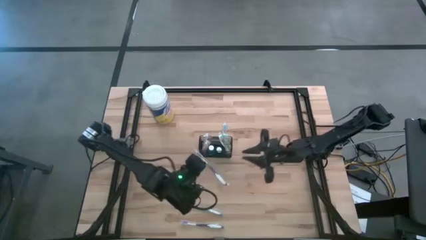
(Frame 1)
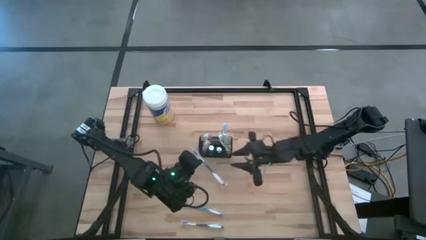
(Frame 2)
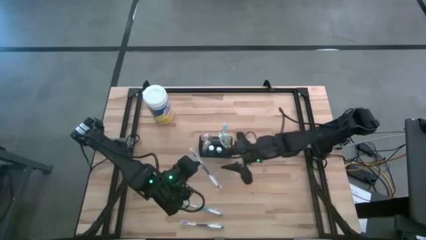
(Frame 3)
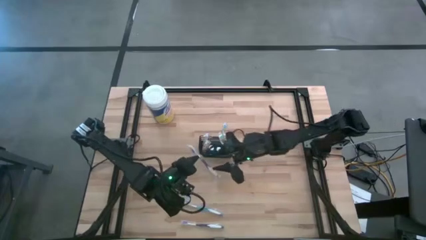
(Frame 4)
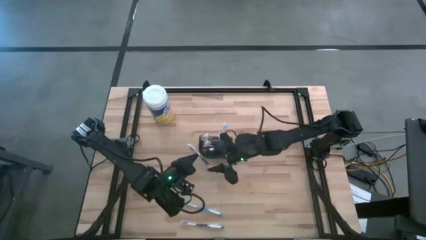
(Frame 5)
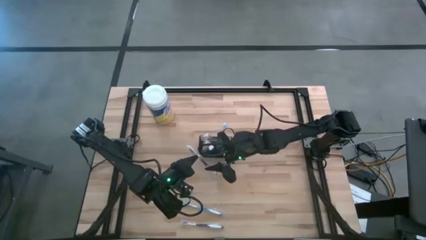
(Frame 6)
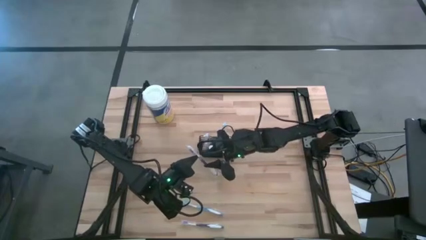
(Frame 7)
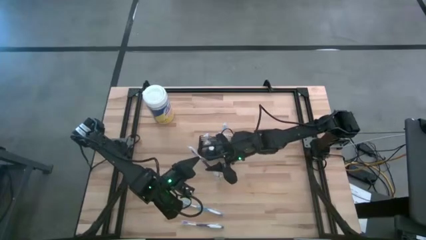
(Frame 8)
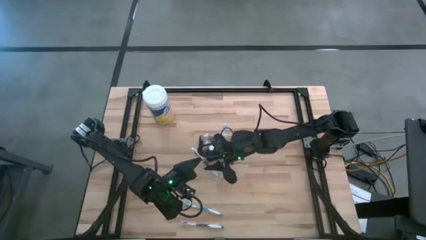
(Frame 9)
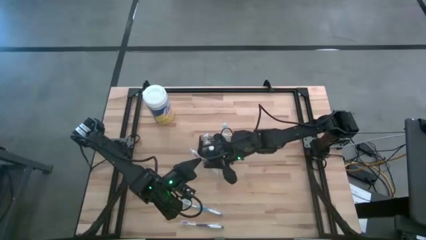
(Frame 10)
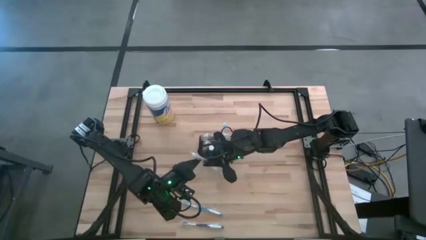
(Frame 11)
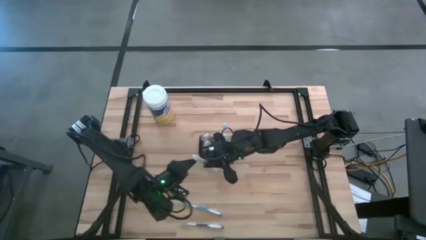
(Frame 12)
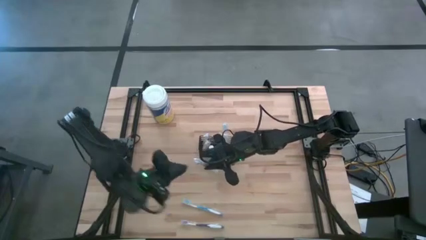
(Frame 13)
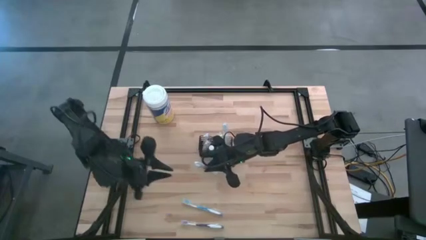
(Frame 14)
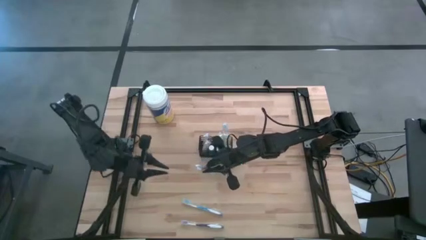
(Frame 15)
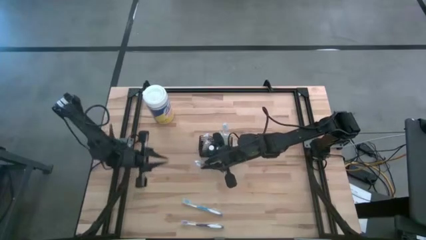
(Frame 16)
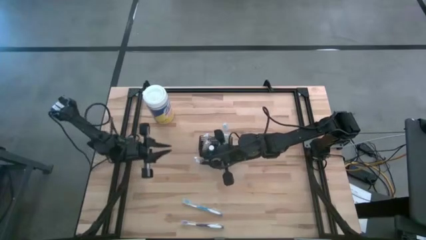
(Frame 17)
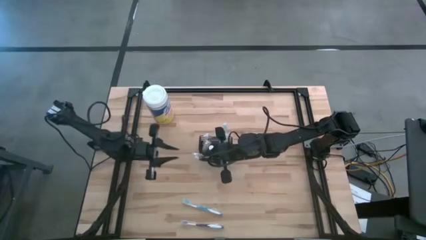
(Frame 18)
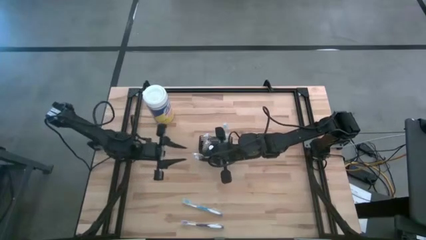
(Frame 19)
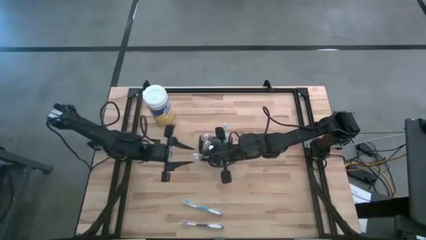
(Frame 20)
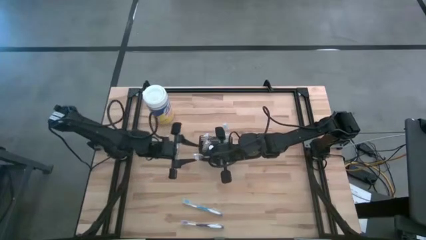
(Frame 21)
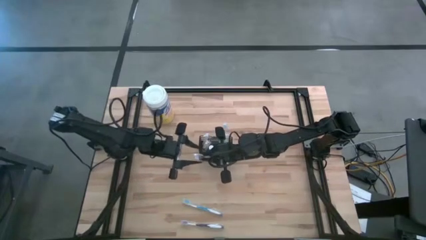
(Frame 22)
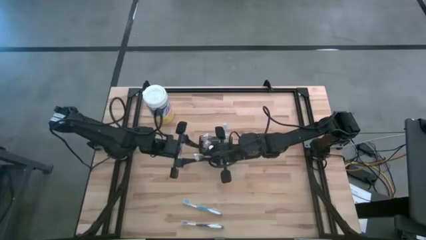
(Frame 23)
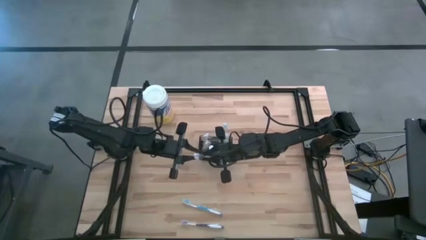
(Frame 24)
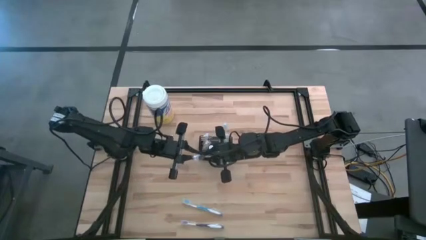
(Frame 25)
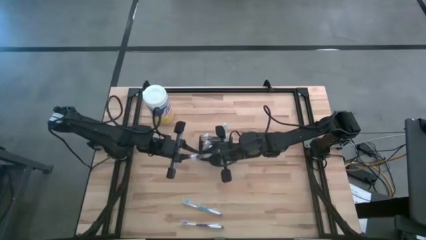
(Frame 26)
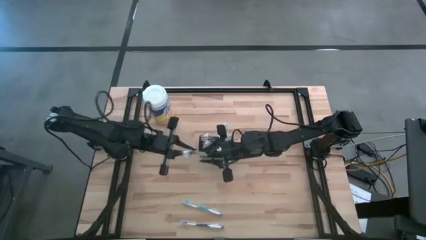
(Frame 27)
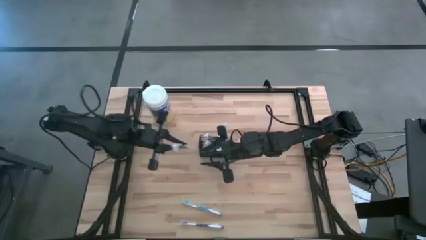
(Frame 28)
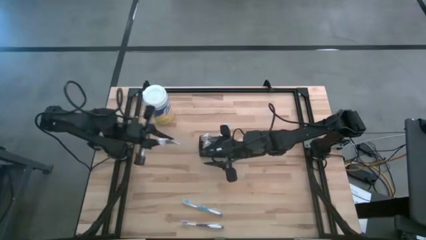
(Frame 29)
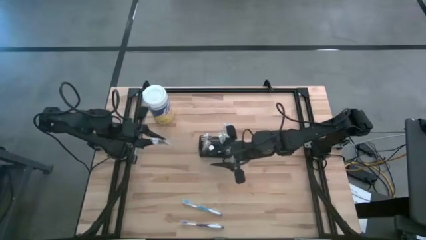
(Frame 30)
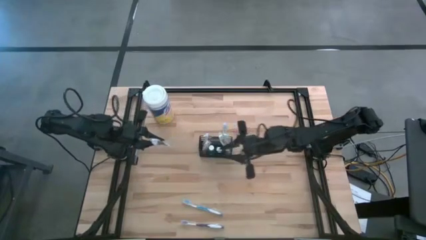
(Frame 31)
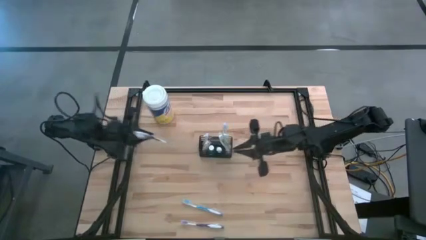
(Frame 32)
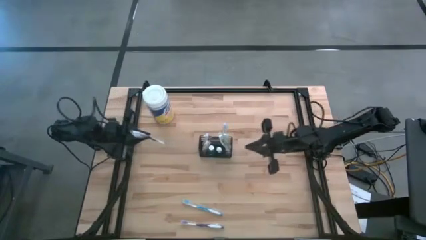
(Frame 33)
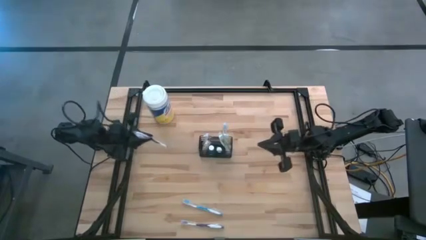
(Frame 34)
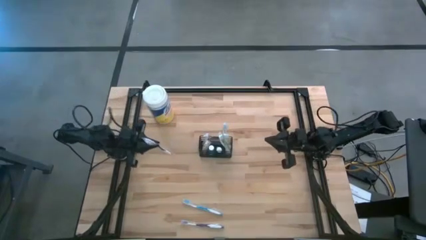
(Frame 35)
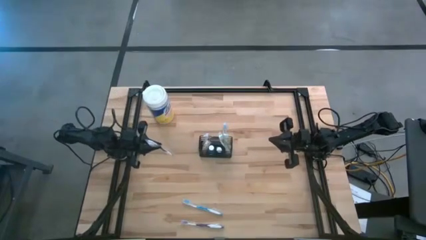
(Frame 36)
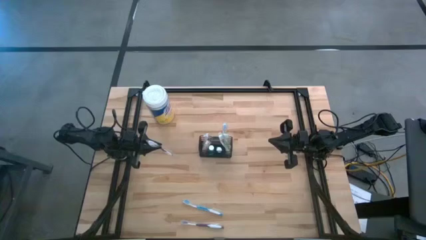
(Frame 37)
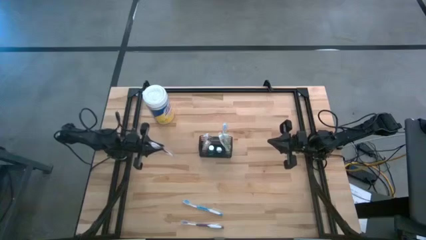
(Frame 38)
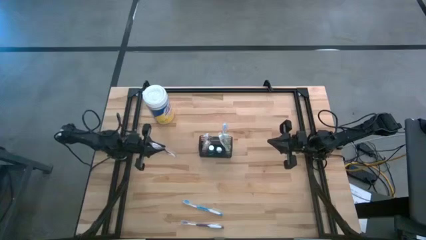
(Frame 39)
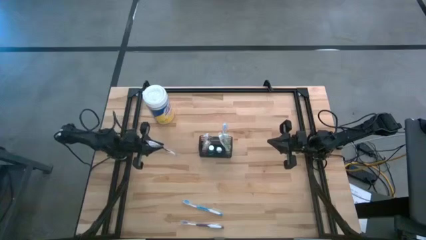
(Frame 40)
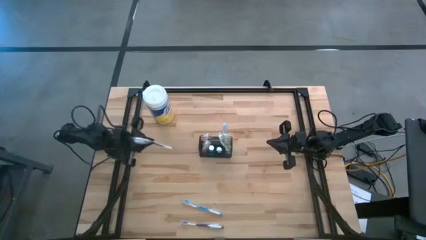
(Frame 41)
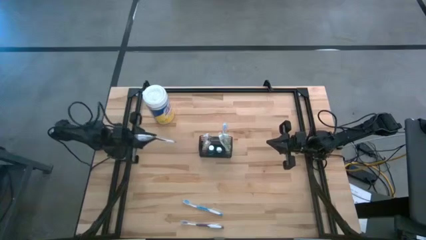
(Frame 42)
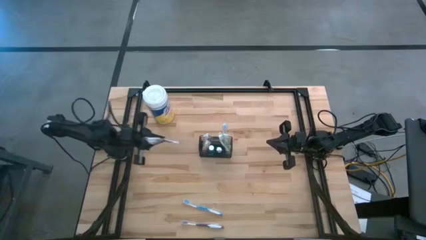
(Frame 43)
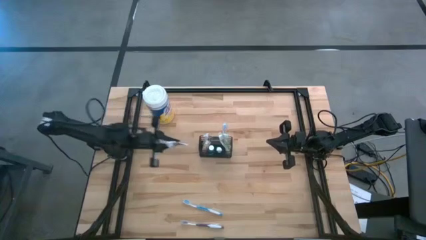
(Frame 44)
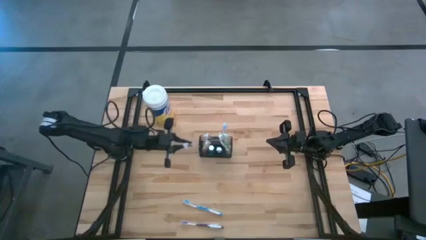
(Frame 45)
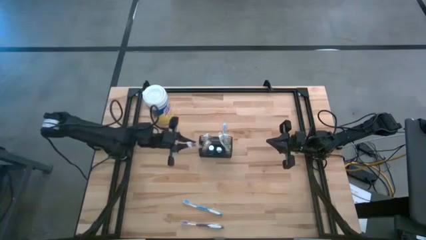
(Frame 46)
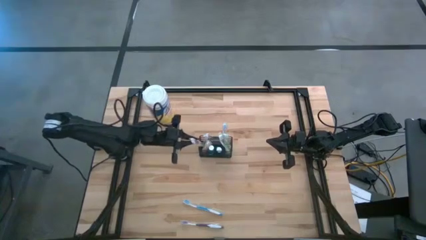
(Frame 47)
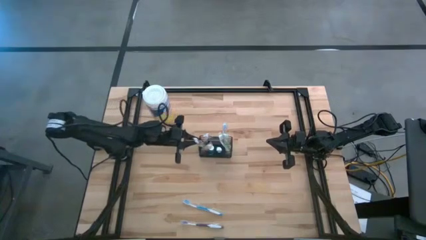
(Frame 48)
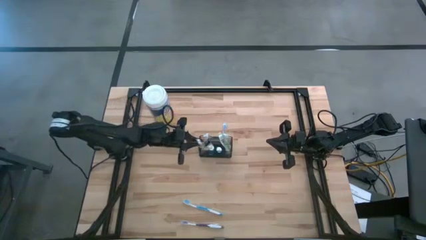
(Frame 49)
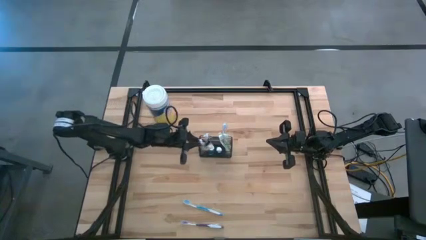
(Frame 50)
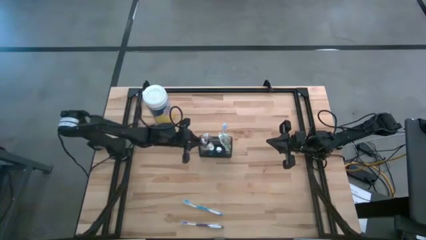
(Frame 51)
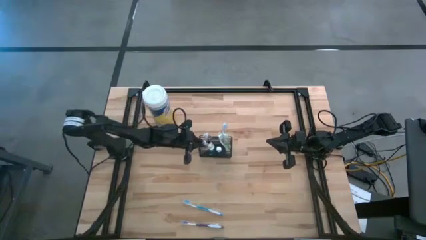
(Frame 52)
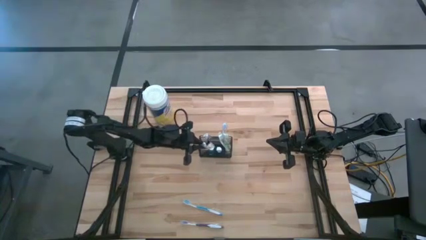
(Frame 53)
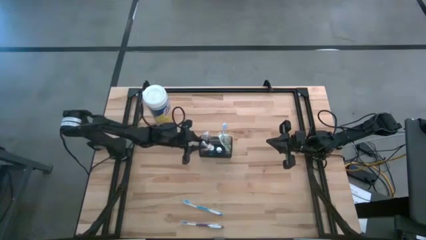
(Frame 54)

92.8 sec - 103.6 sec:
Task: Pick & Place toothbrushing station
Put the top purple toothbrush into the wire organizer

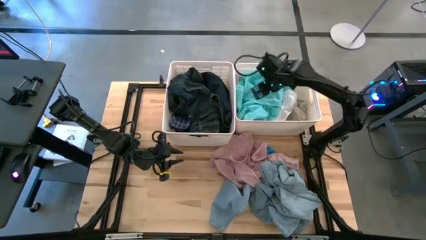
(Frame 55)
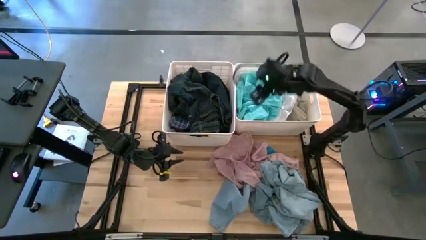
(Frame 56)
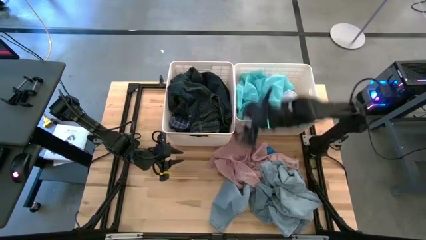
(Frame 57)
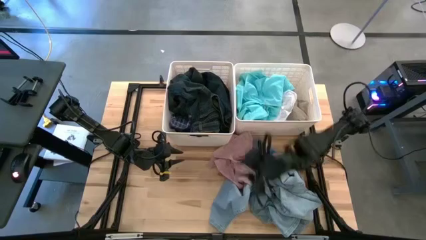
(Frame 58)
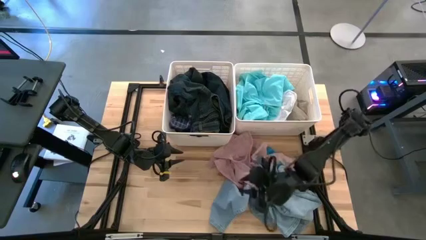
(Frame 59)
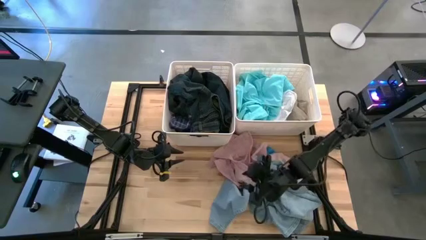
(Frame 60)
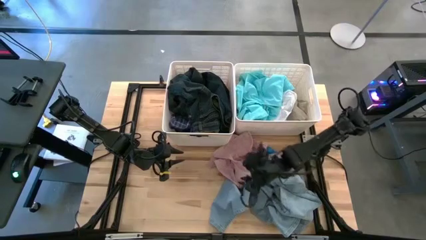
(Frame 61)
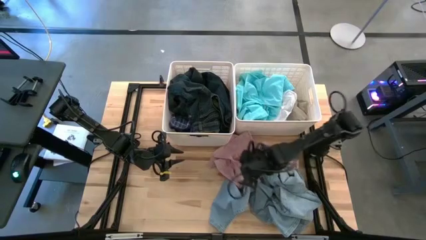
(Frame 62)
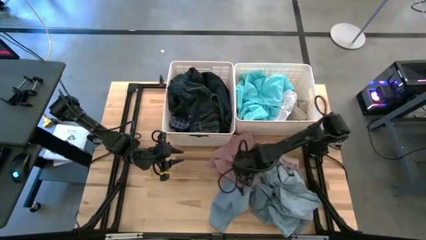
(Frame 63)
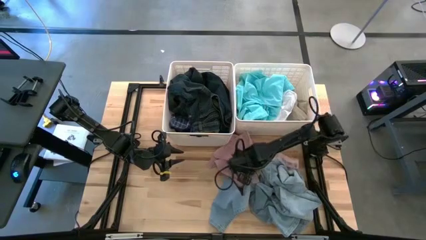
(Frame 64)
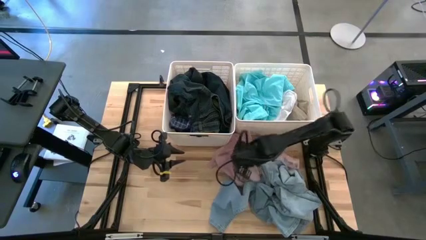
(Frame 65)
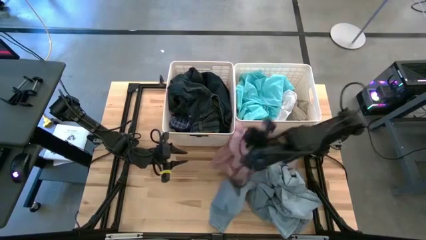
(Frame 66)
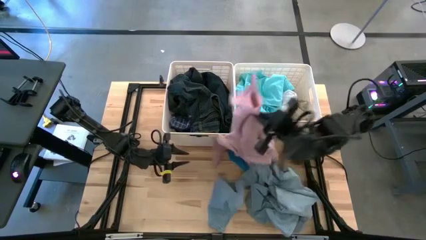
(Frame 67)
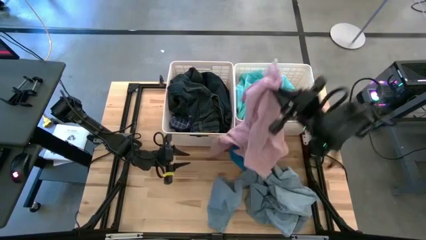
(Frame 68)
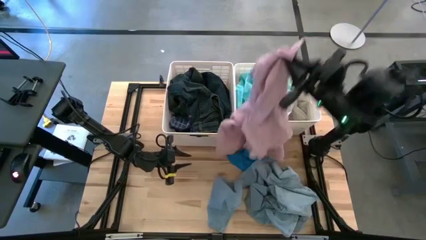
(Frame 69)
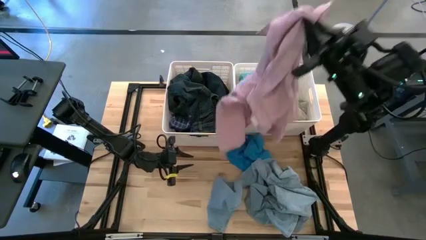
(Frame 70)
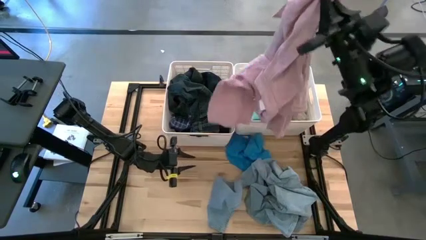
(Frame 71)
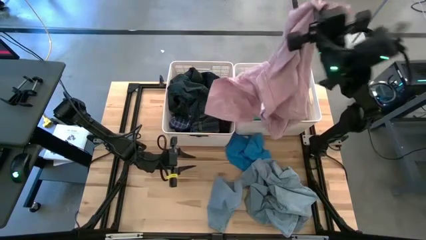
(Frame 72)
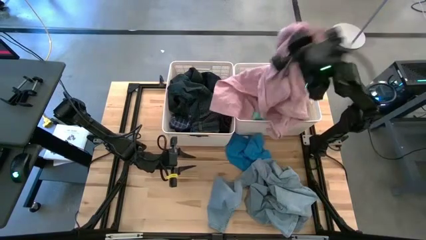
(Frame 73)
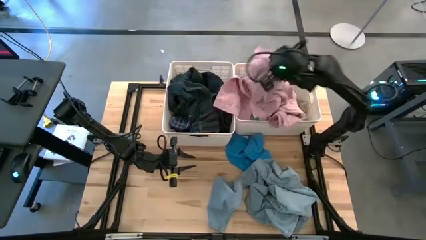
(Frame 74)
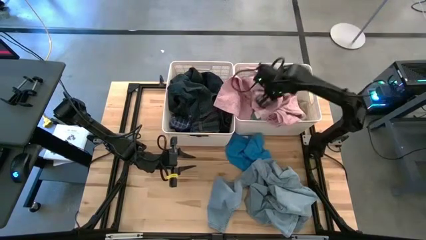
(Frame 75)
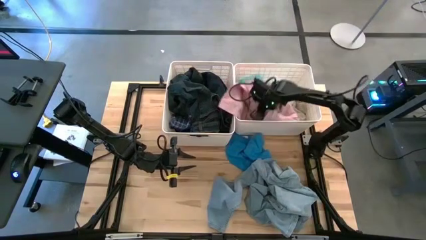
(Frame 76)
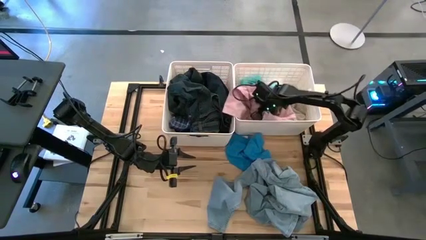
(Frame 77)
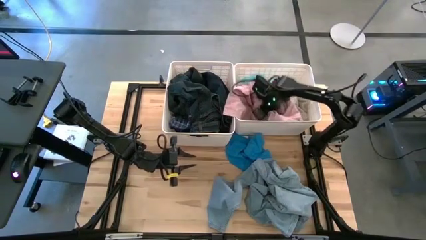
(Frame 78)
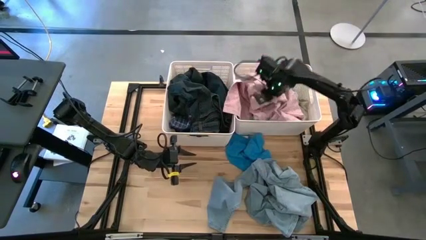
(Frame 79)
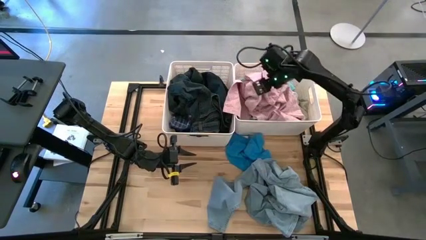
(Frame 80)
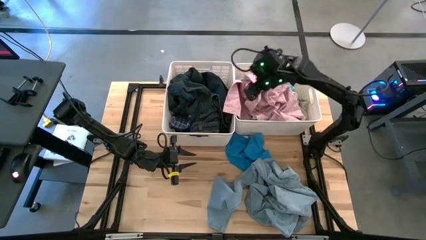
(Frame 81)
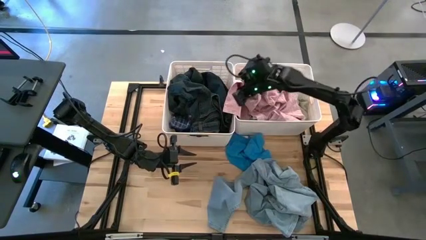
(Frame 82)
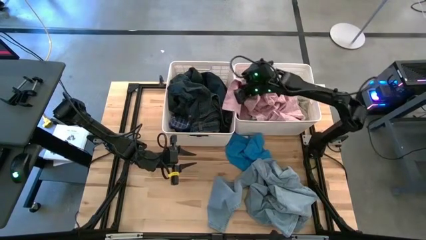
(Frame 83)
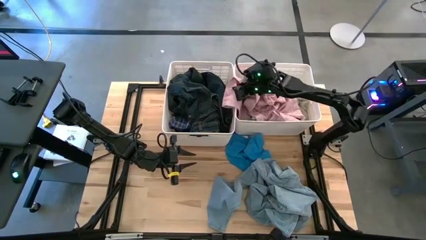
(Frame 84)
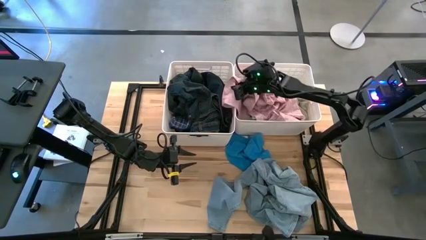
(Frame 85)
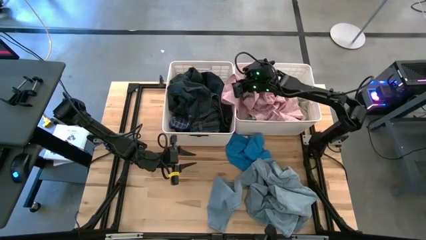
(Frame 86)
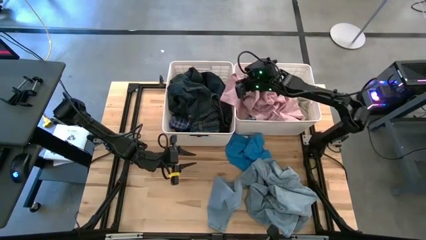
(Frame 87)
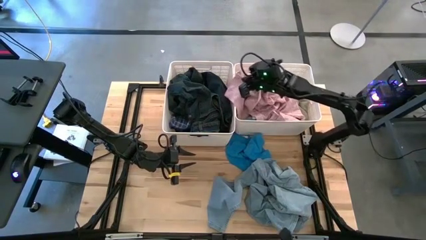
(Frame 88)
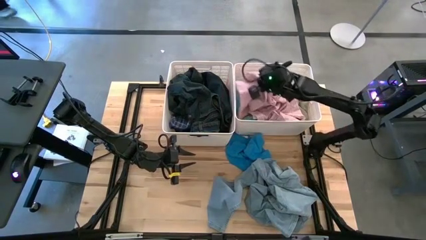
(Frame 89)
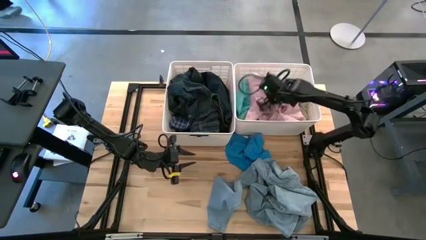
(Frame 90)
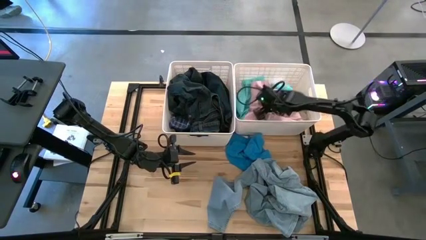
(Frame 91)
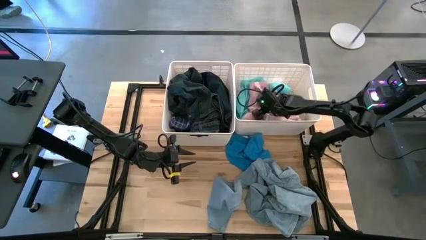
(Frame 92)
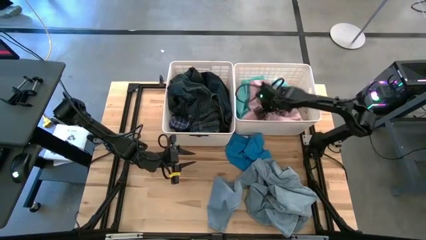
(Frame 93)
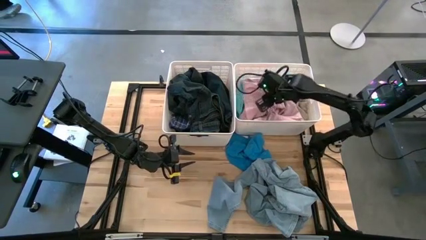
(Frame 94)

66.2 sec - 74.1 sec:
Task: Sort clothes
Put the pink shirts into the right white bin
